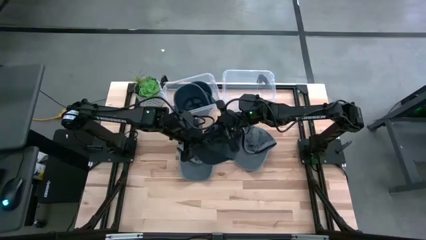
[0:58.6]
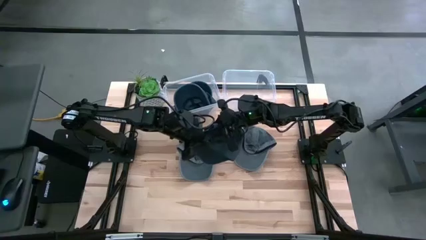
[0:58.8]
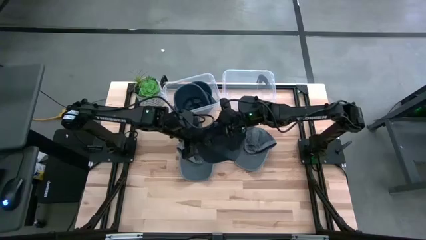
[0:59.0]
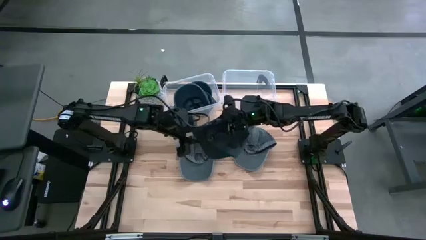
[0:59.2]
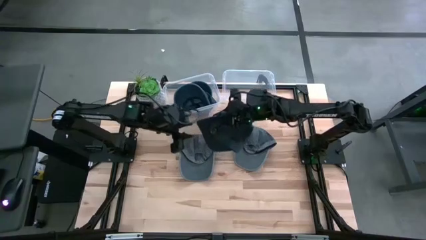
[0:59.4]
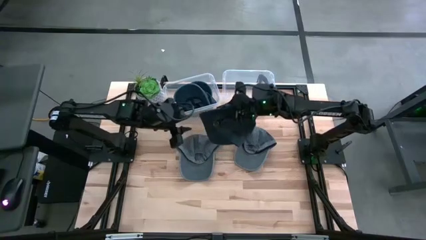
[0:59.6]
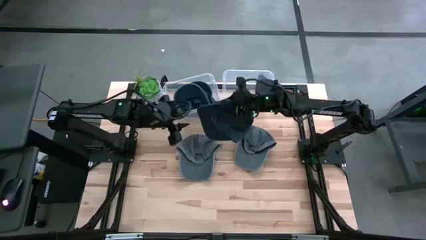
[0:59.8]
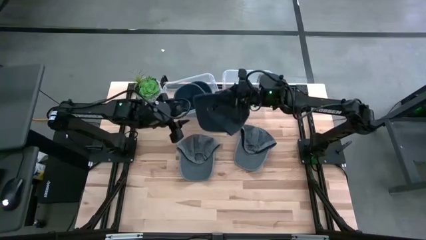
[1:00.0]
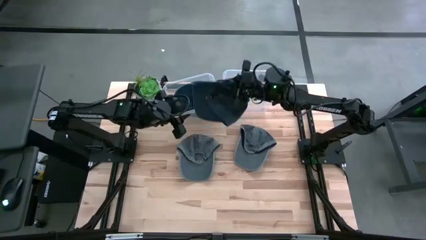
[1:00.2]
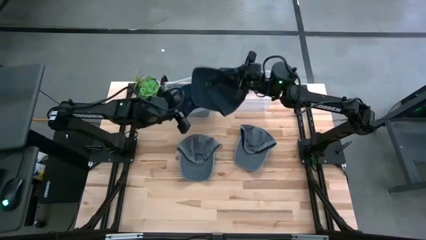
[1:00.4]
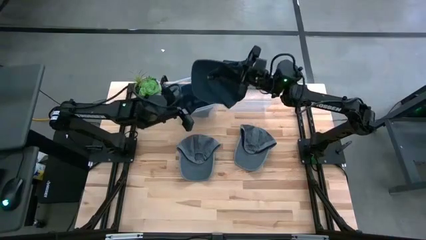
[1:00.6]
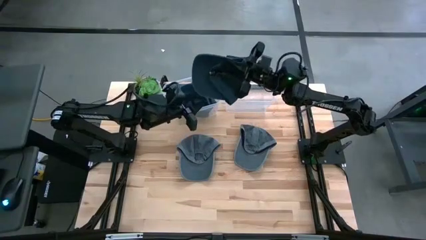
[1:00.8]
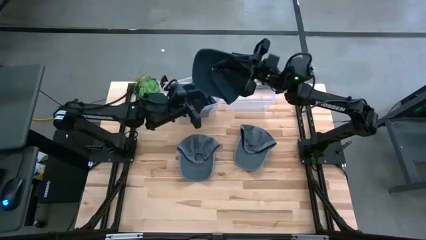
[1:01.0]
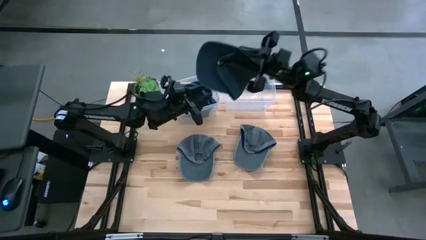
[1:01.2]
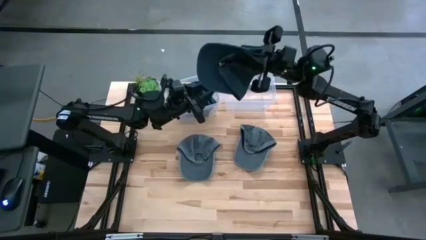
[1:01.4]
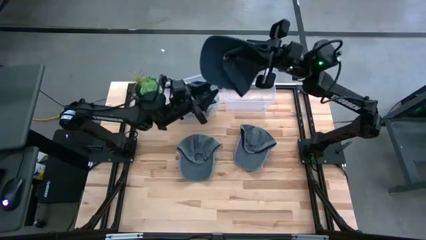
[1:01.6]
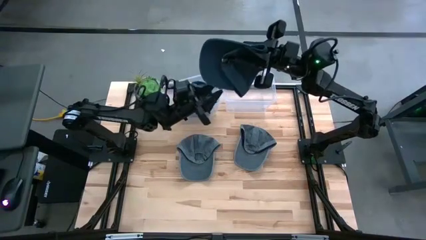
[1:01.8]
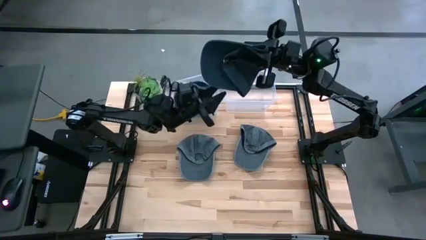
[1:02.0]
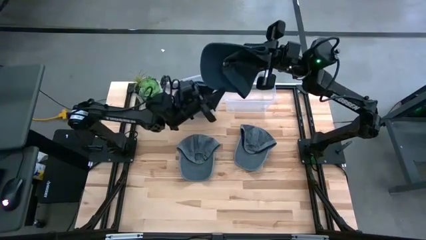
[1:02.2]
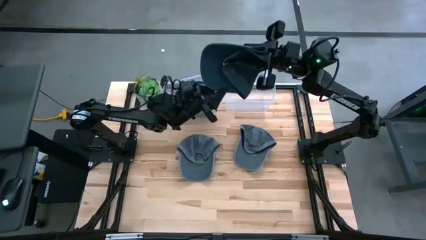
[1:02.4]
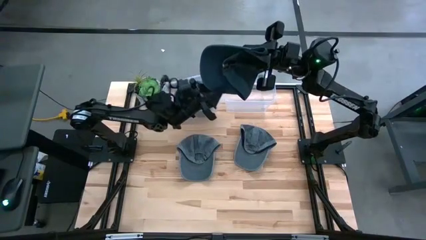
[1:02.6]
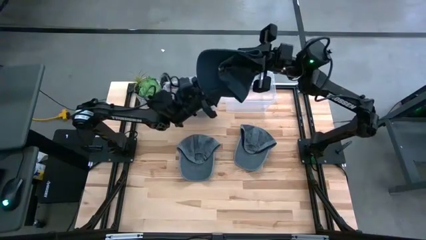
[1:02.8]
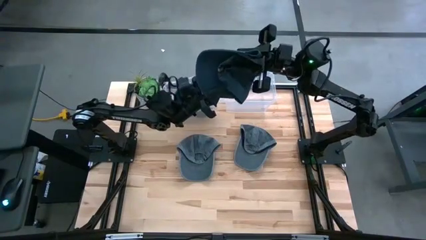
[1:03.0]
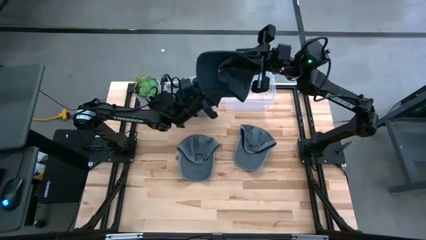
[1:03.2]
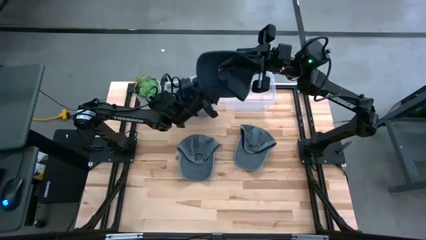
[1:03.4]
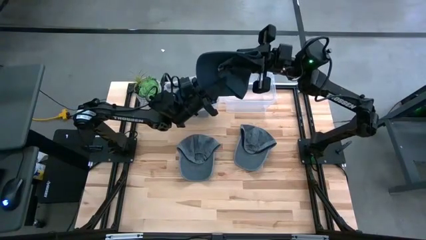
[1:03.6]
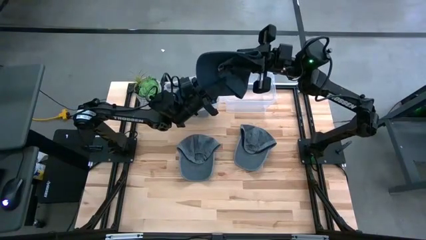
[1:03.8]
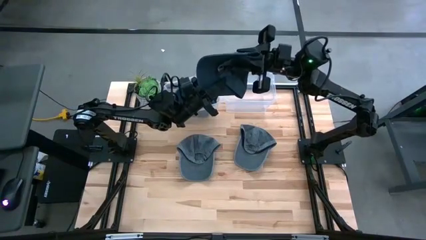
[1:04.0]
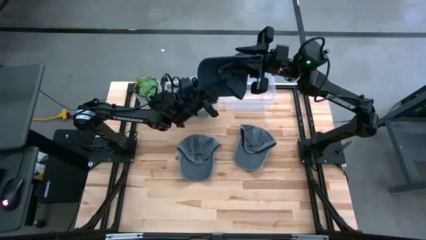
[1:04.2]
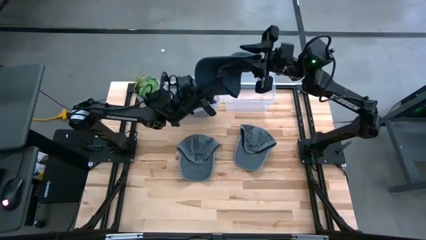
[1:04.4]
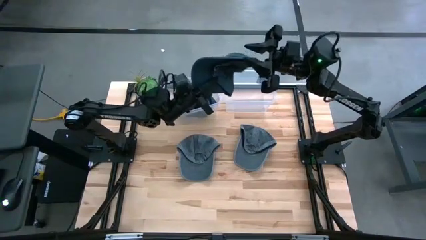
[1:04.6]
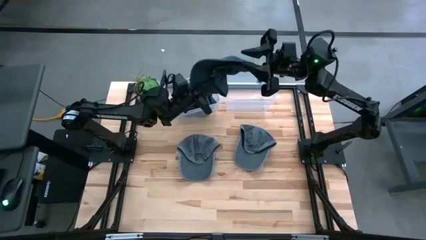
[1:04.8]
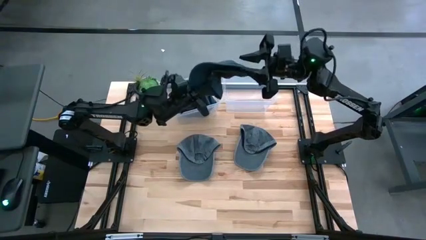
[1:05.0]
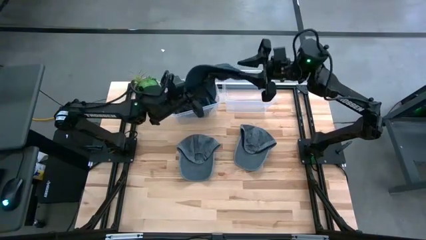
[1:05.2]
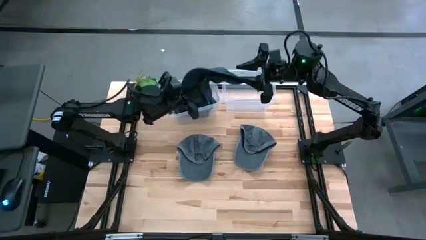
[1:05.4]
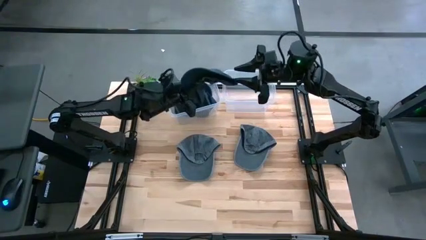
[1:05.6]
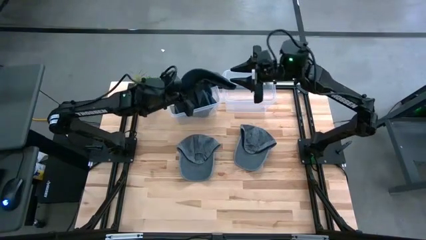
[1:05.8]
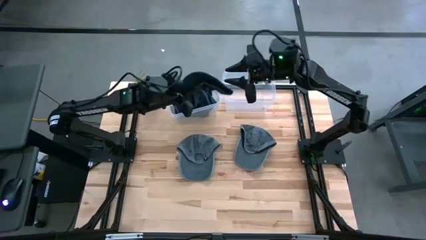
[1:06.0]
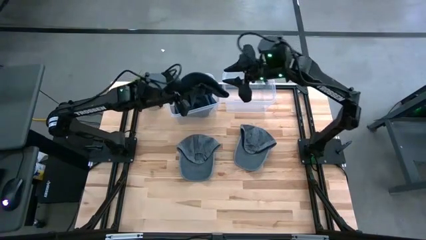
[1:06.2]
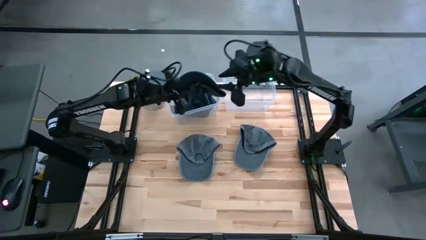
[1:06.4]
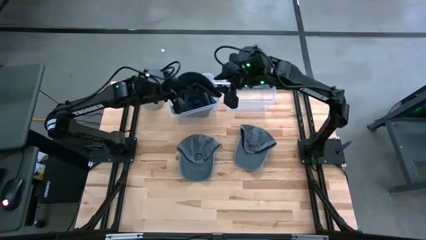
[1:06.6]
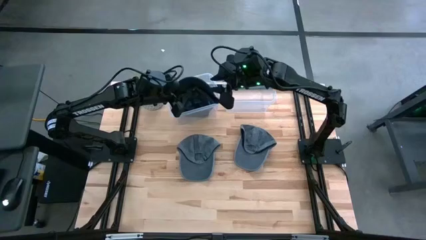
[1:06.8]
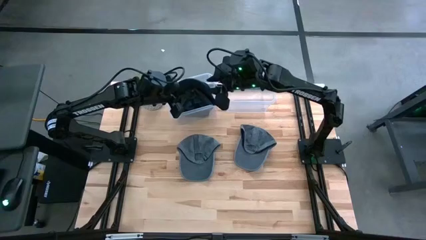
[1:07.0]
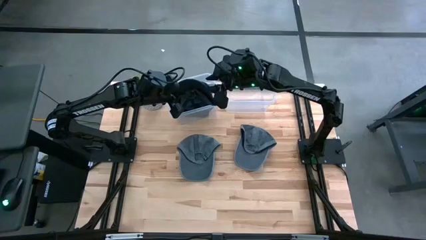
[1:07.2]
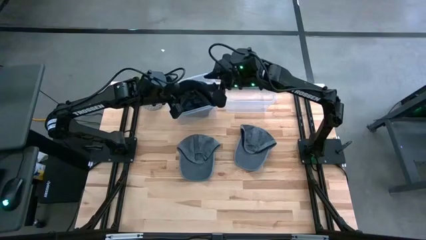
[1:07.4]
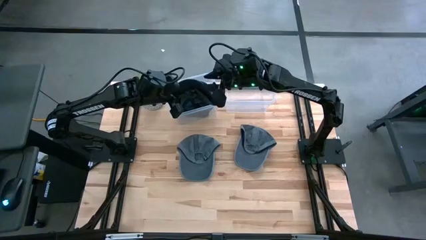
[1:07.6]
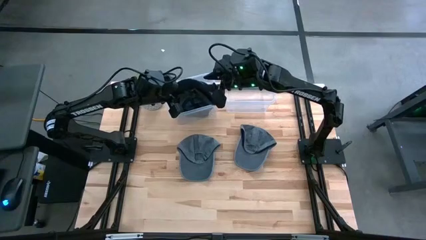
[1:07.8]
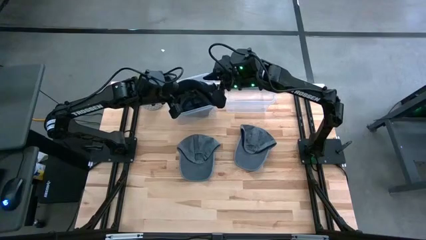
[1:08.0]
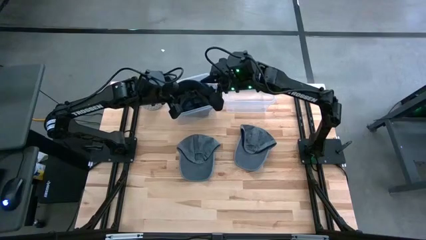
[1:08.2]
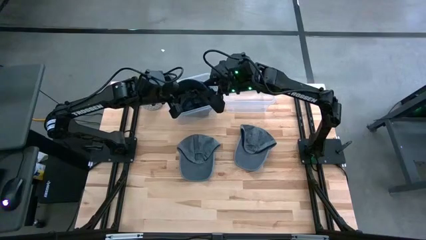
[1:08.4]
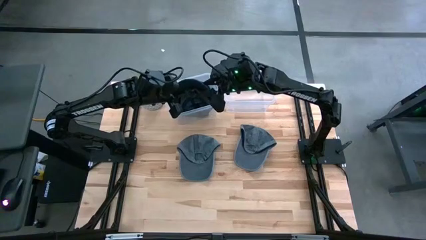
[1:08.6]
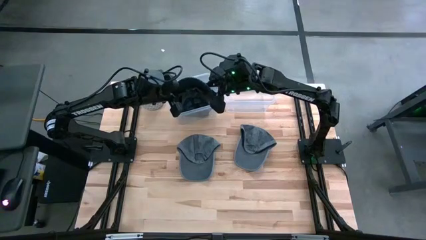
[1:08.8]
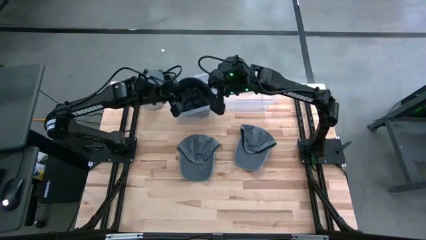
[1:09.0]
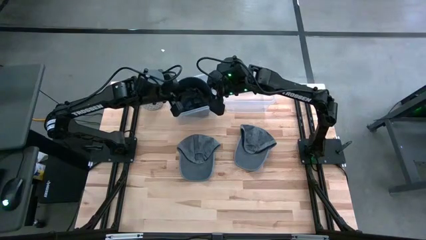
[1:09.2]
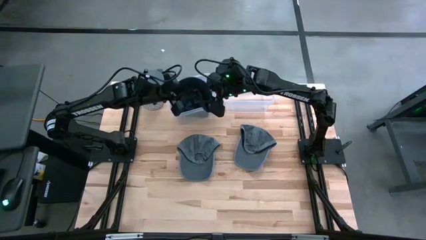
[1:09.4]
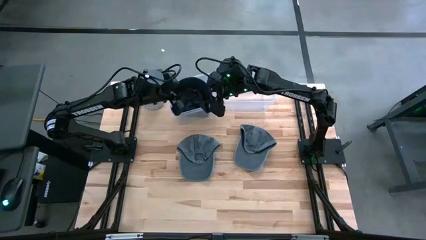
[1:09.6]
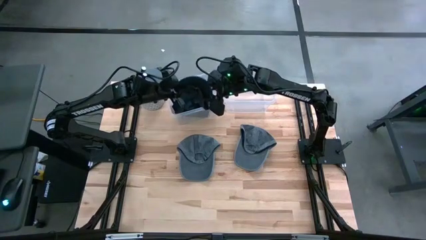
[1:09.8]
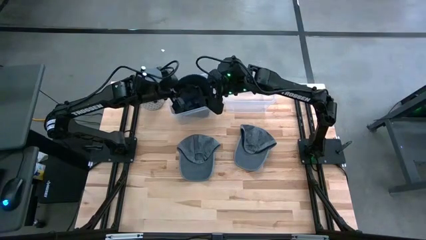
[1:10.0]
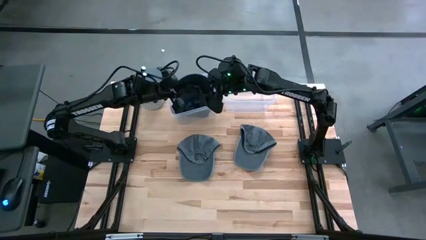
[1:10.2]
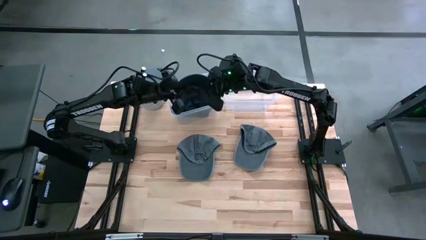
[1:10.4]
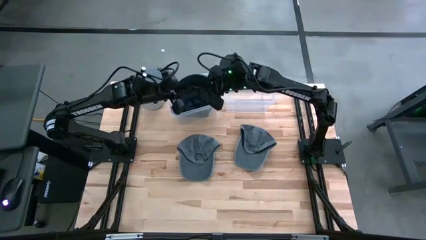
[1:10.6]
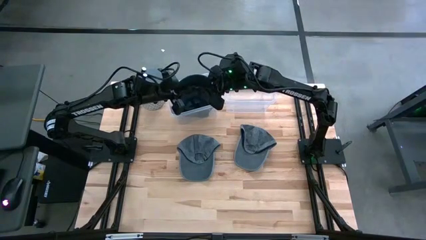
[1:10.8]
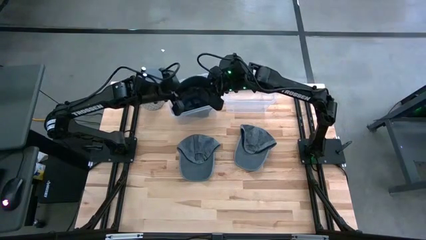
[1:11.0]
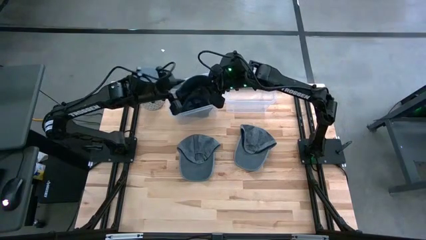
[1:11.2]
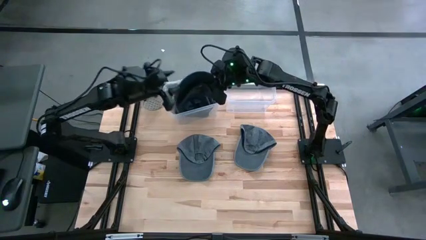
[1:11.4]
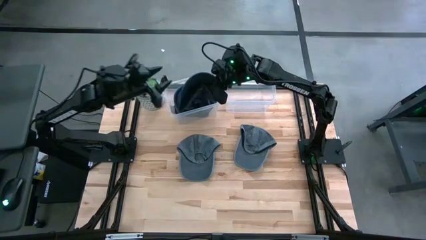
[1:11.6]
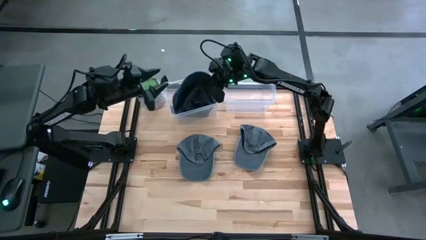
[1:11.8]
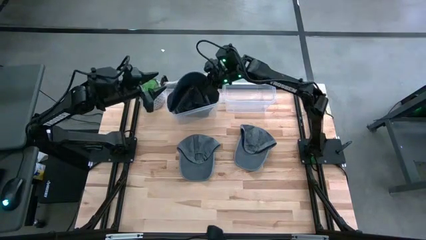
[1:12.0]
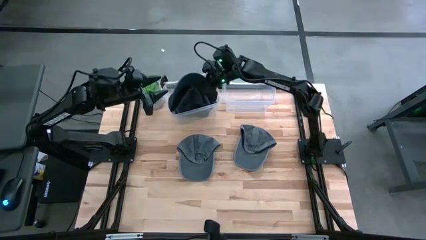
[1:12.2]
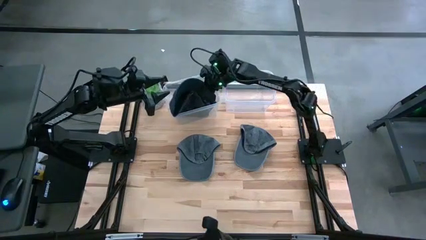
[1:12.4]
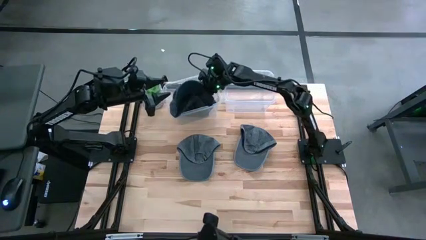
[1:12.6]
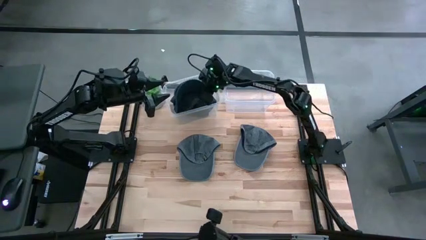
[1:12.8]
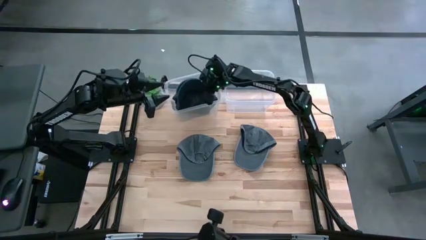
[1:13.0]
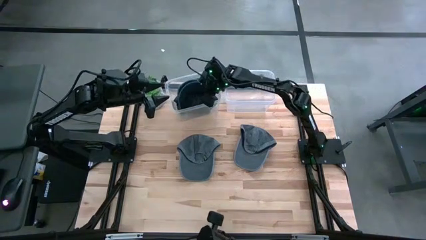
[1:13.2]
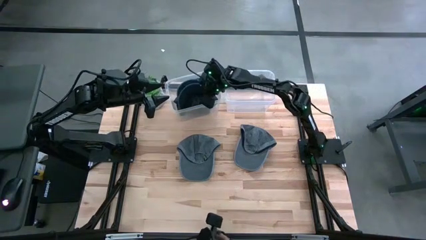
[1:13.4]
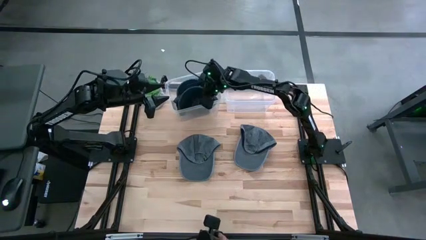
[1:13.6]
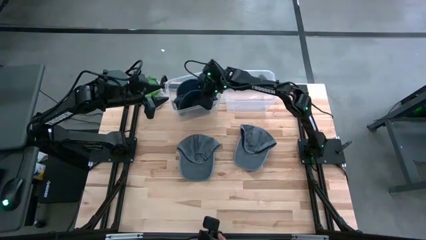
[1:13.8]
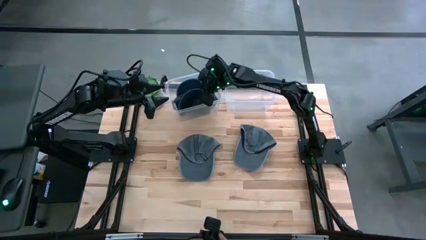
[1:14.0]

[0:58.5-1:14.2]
Task: Pick & Place hat
Put the dark blue cap into the left transparent bin
